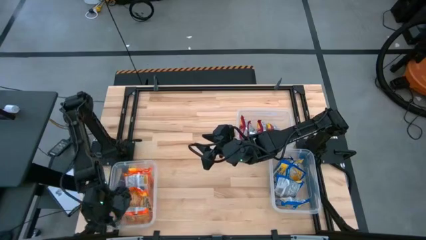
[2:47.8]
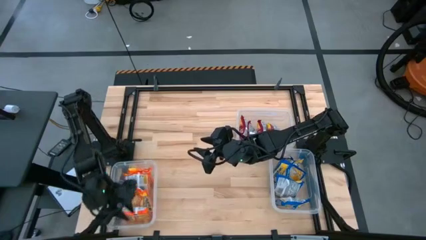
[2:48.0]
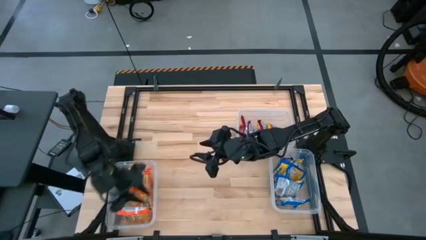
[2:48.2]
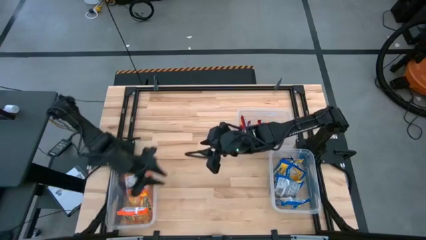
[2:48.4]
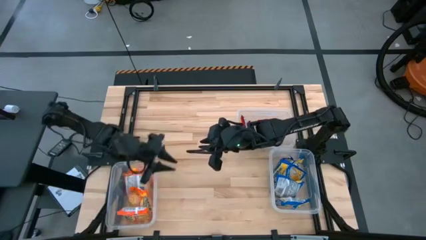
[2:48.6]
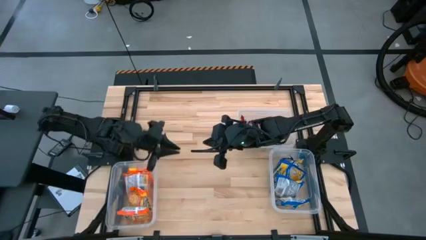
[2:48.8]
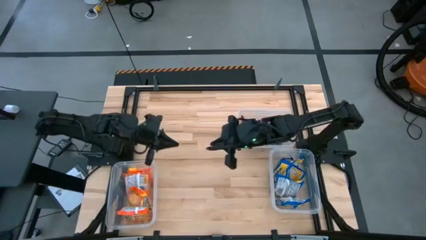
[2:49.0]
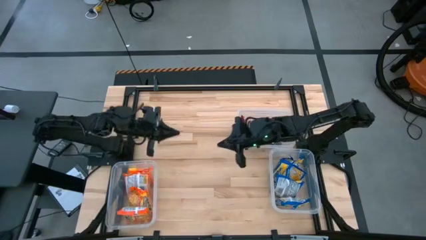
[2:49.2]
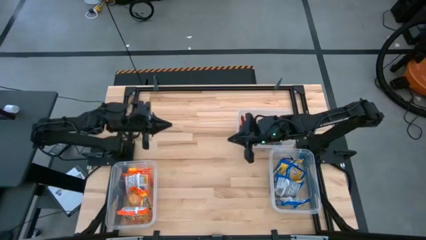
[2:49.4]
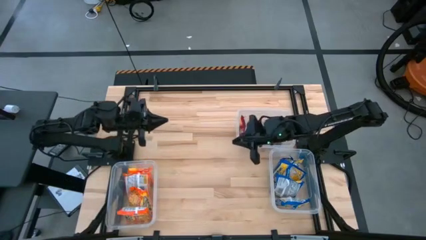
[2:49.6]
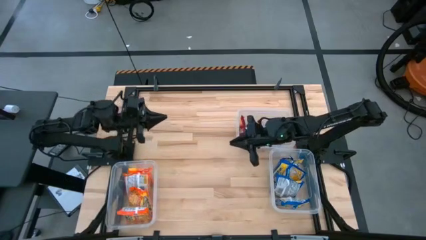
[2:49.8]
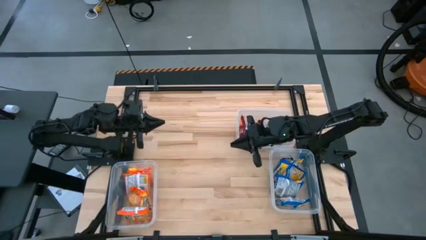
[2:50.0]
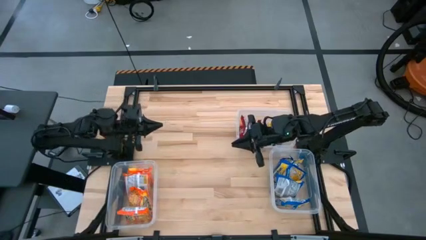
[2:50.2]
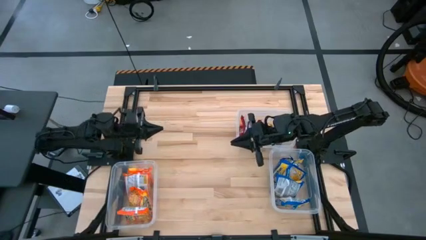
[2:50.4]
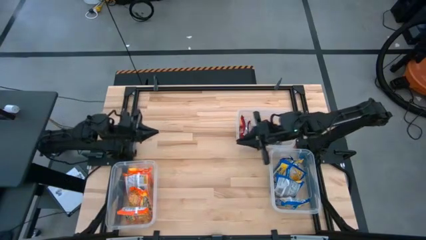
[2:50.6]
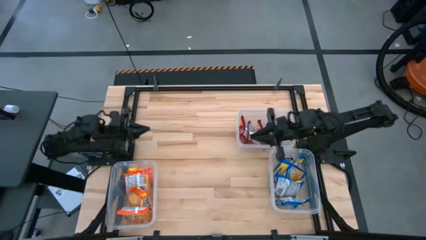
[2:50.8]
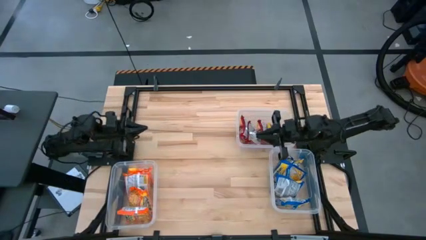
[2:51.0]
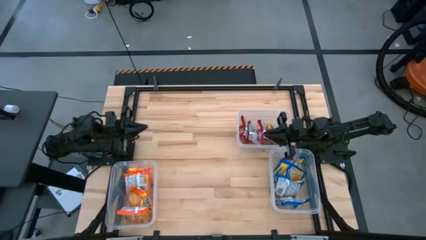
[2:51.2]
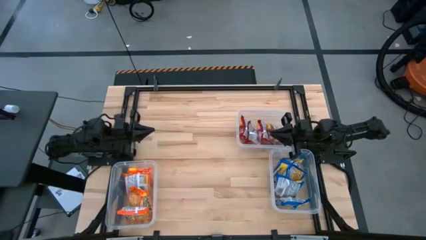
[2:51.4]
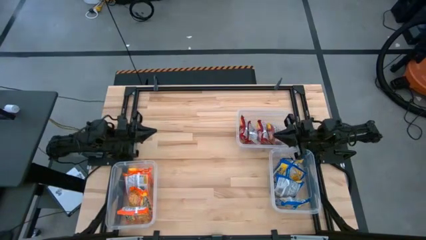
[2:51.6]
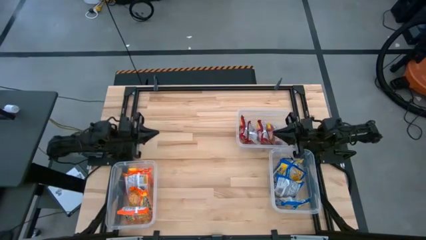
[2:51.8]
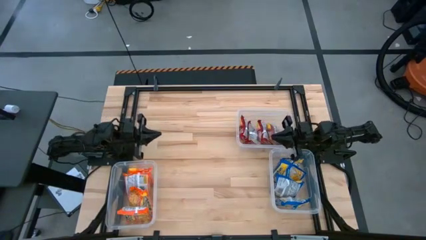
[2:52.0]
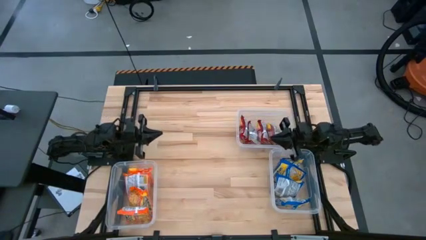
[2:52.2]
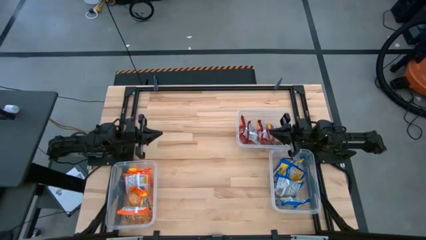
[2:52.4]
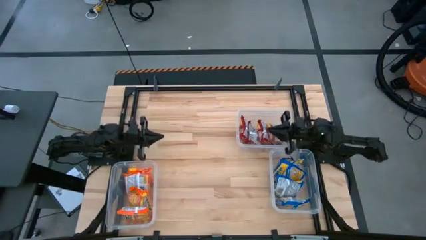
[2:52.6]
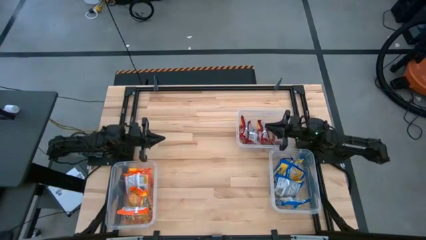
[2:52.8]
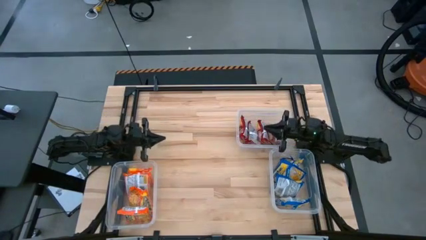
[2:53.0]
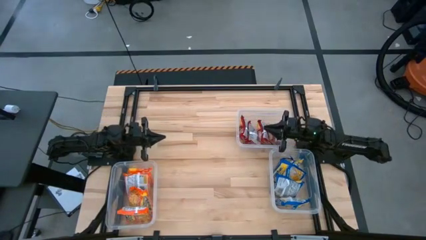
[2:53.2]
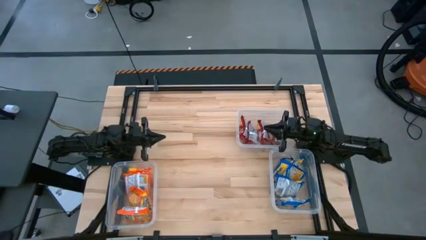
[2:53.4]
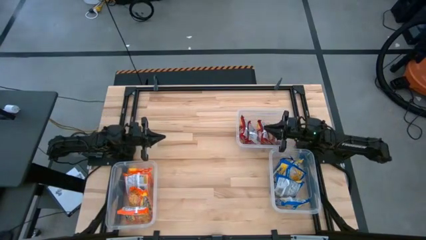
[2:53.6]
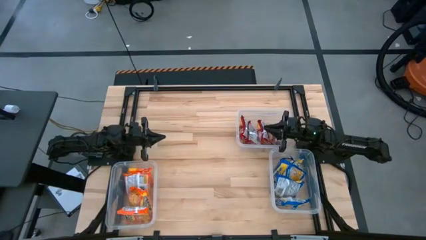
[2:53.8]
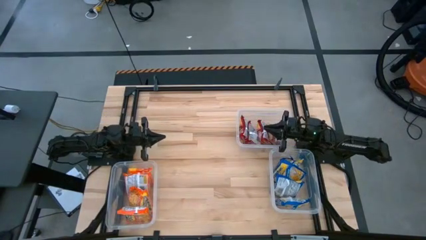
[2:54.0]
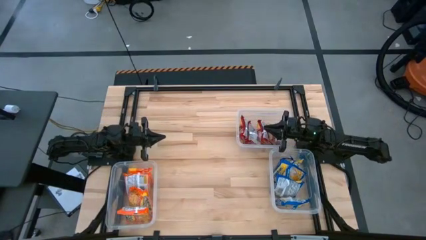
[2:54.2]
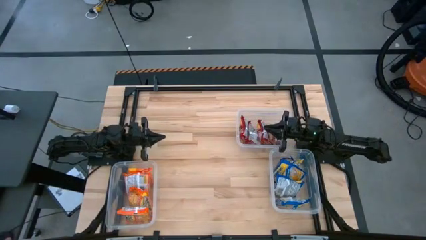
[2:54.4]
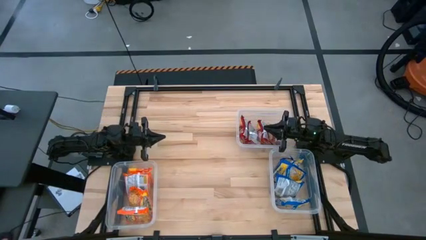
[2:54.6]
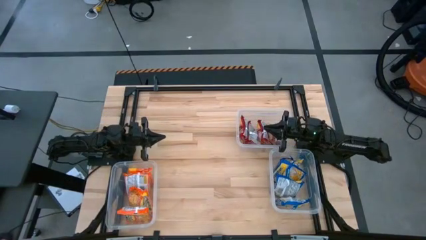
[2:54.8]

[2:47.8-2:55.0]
Task: Sort Maruchan noodles
Return to Home Position

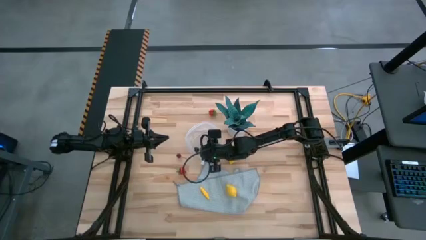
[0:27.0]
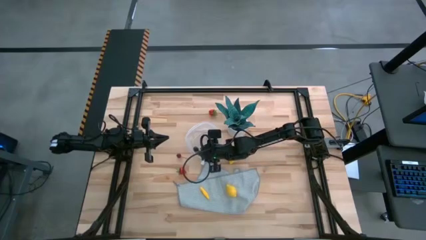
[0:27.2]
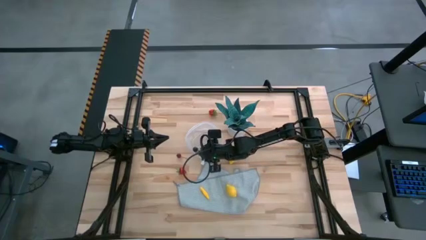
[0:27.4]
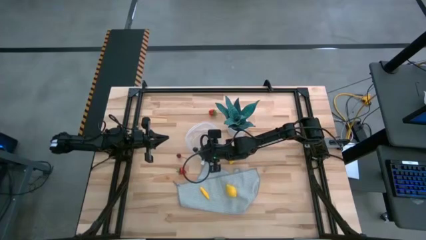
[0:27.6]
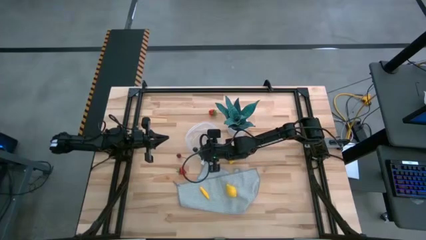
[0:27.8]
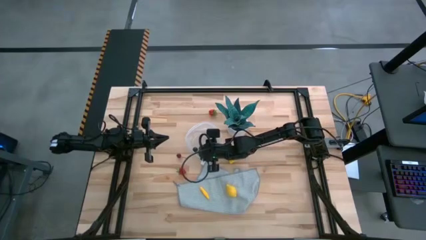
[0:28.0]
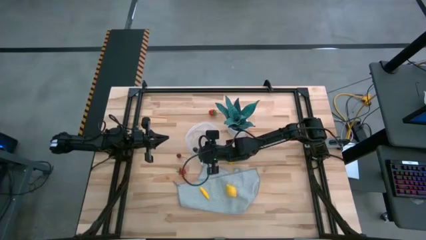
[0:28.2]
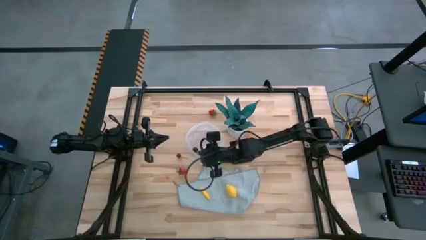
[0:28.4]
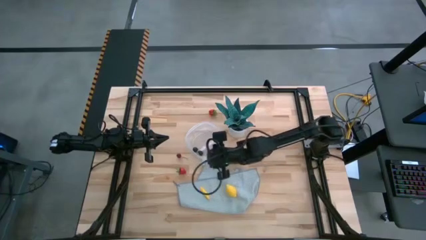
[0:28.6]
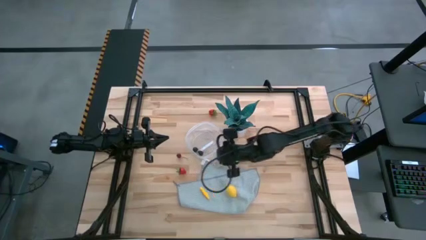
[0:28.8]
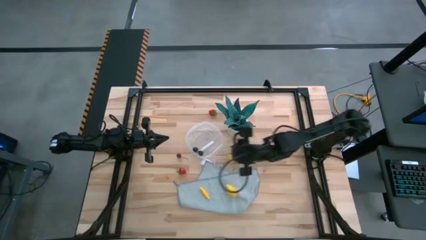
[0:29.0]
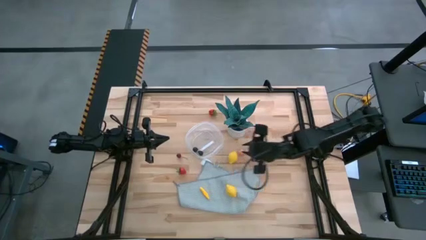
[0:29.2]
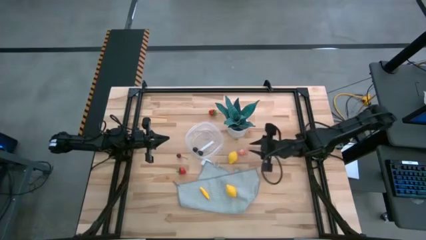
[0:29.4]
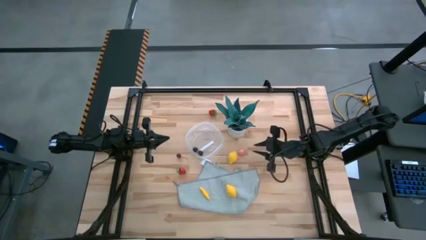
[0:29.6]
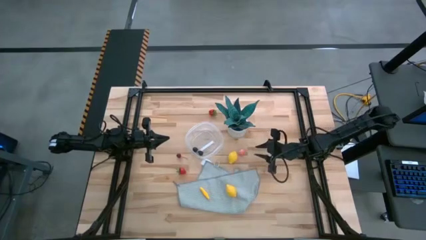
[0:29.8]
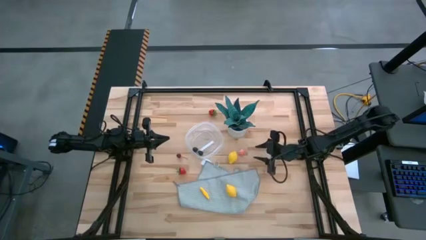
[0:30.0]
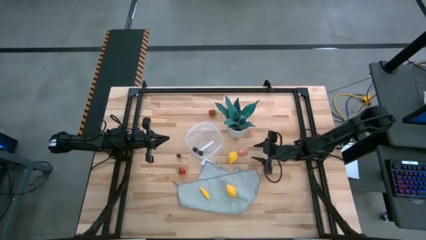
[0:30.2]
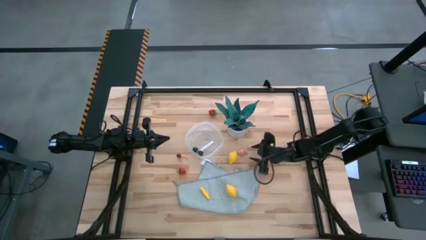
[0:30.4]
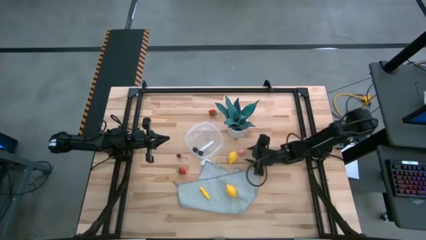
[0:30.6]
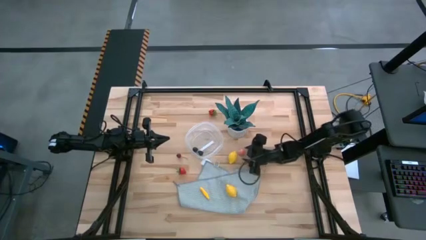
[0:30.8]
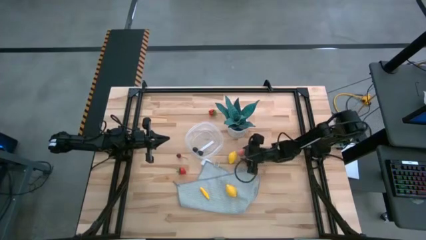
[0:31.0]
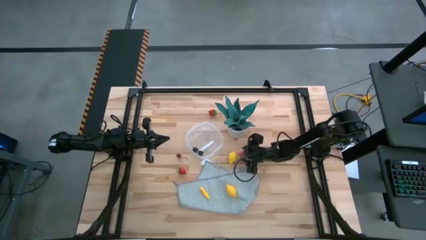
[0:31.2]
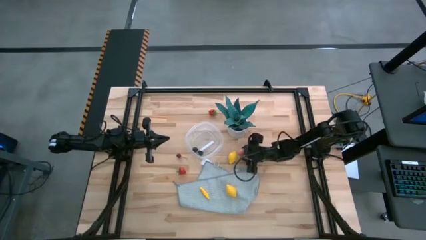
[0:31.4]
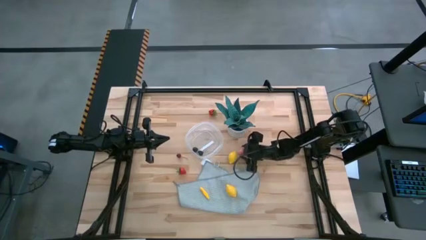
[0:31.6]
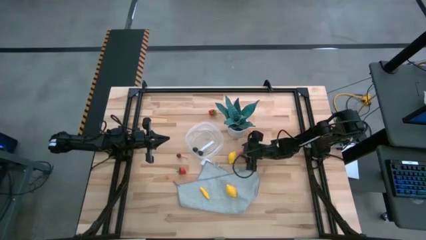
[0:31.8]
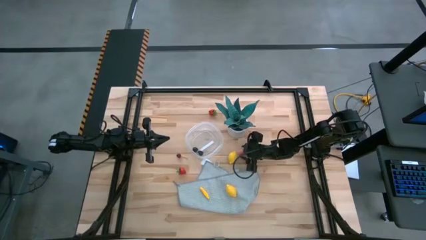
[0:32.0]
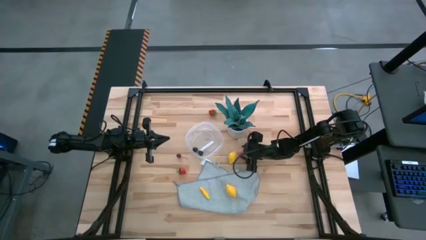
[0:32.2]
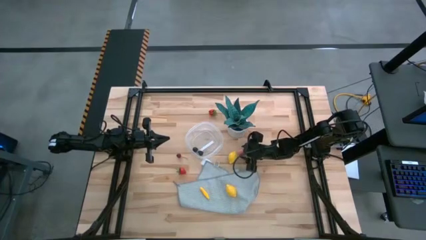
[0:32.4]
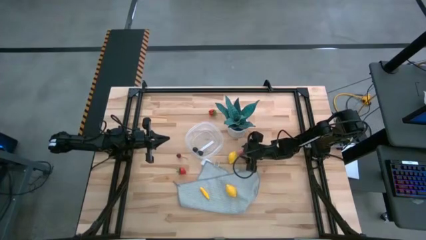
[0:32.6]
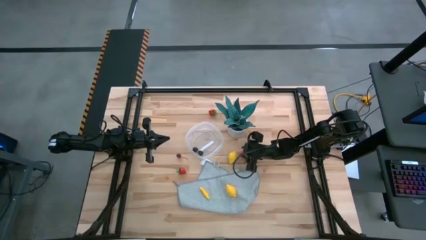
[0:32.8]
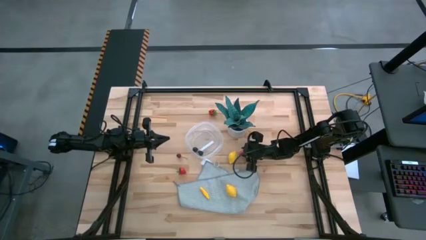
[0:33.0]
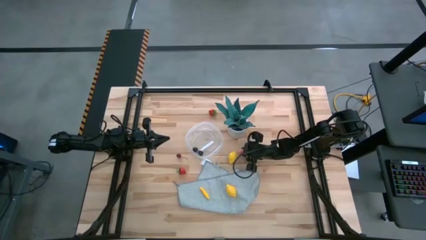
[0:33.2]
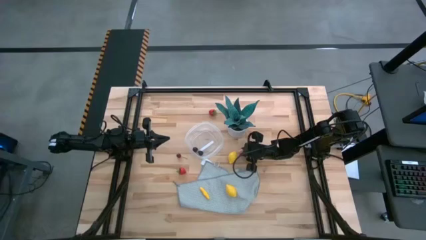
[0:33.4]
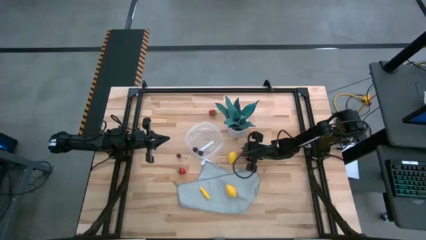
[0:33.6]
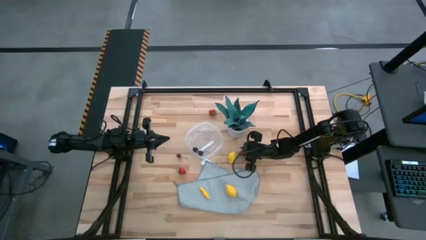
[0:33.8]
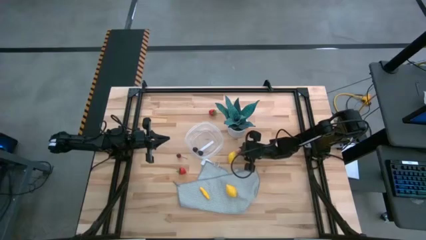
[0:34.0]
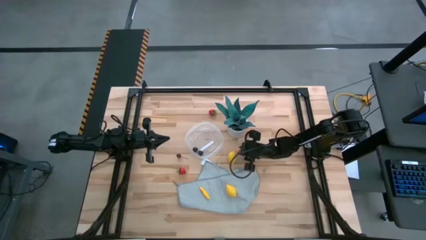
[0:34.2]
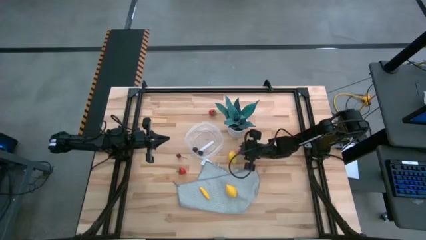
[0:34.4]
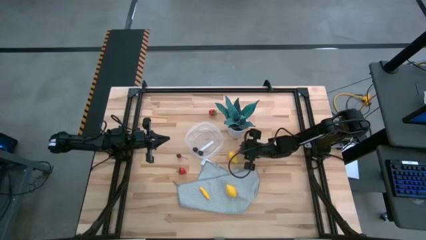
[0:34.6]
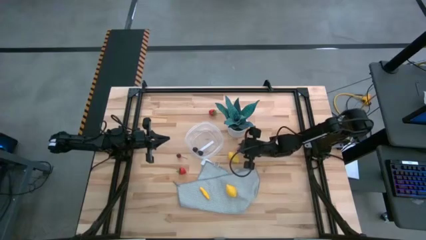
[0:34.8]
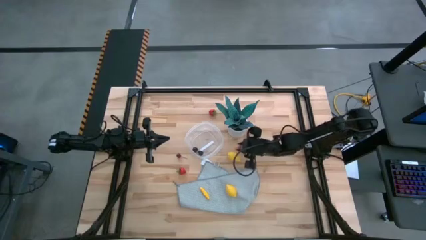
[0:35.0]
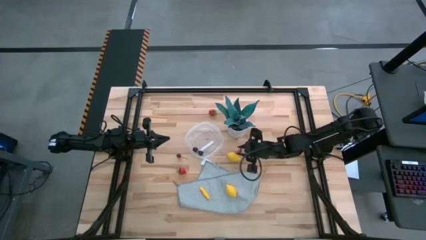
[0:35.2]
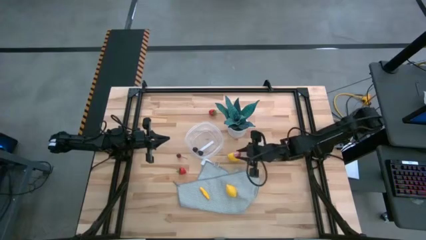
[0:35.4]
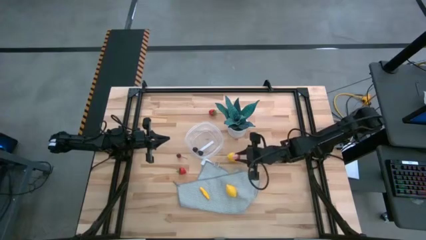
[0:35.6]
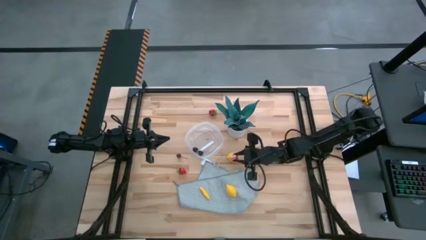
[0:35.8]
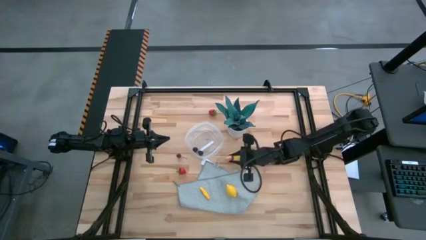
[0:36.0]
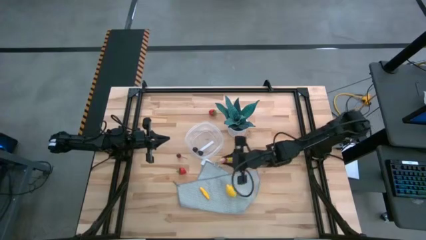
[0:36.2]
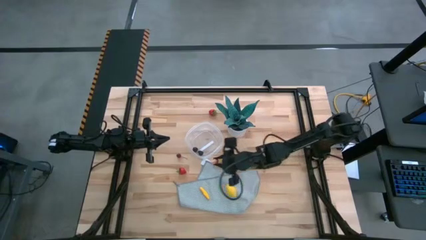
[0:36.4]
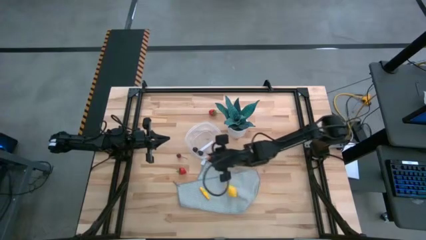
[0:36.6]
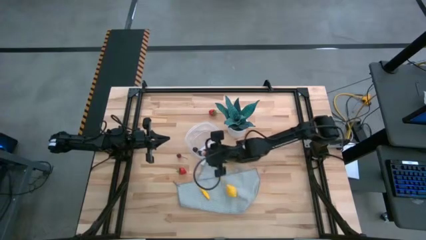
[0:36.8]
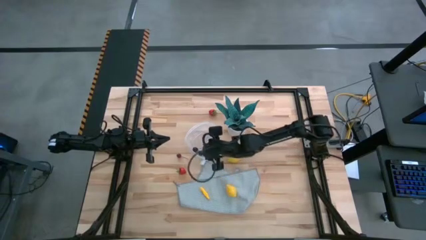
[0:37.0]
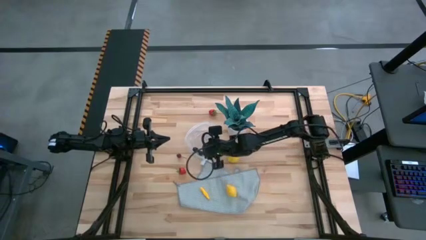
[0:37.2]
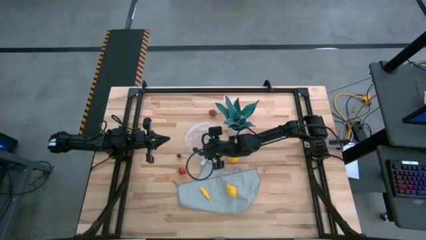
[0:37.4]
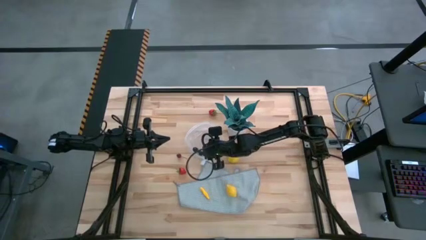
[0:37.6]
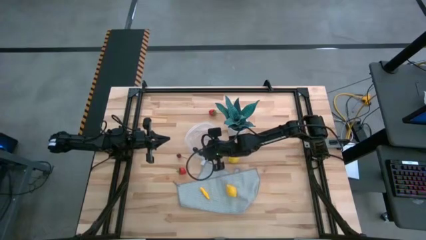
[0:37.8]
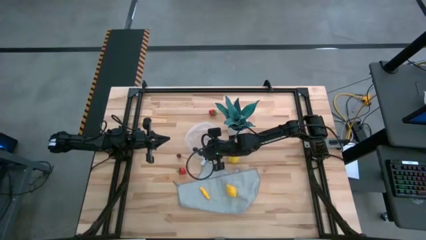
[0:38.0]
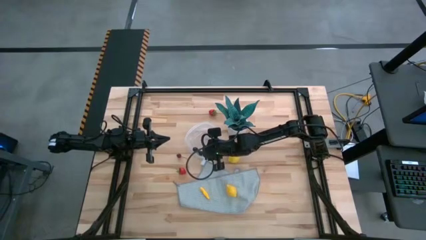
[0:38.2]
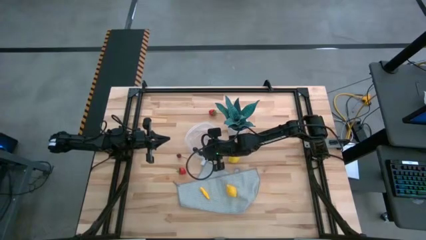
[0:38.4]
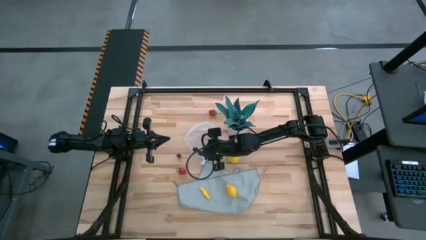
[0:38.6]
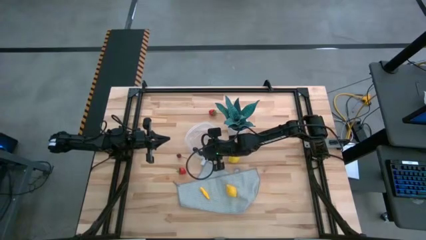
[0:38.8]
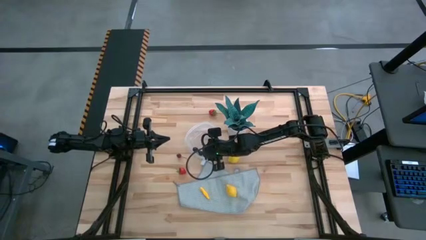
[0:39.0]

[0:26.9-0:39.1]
Task: Pick and placing Produce into tupperware
Put the pink peach into the container
